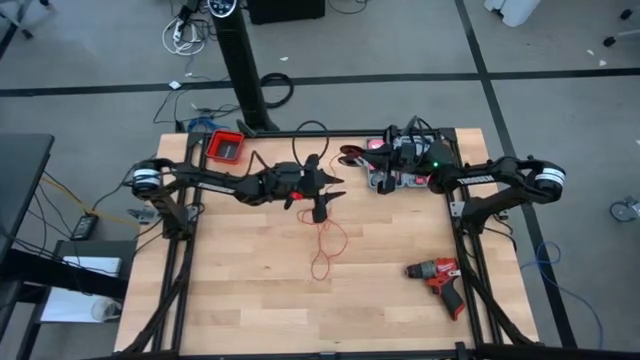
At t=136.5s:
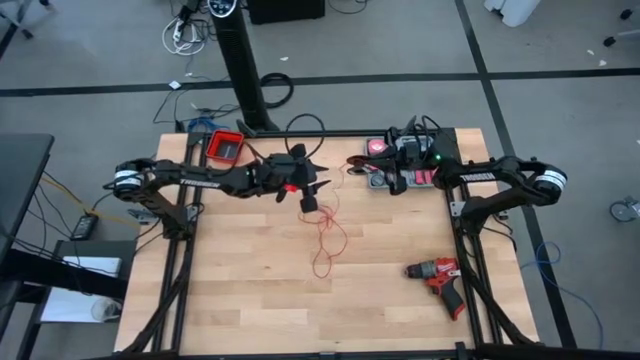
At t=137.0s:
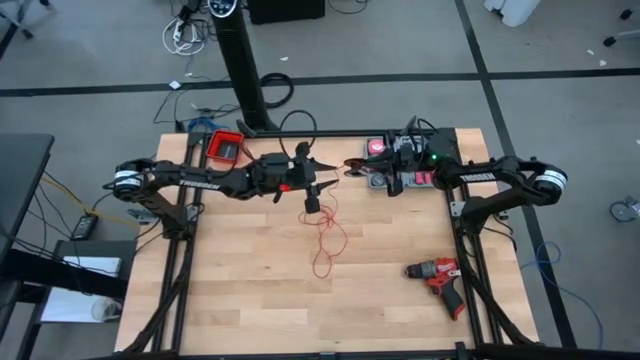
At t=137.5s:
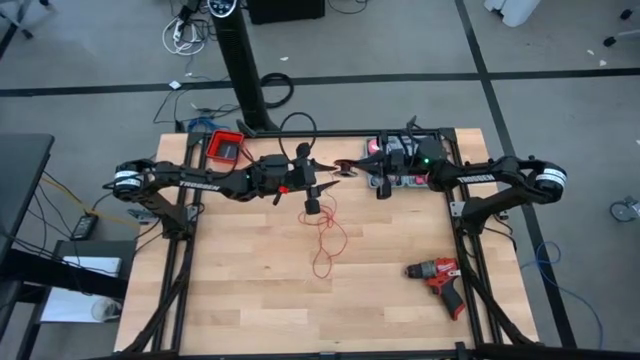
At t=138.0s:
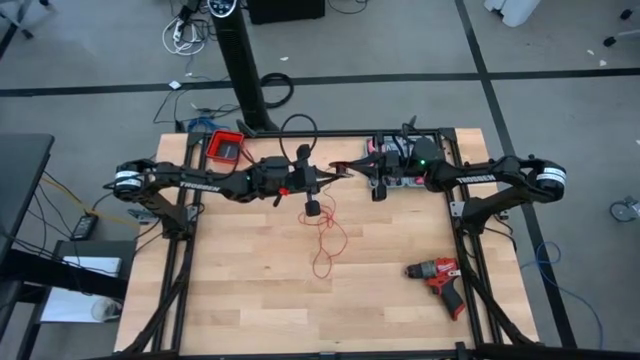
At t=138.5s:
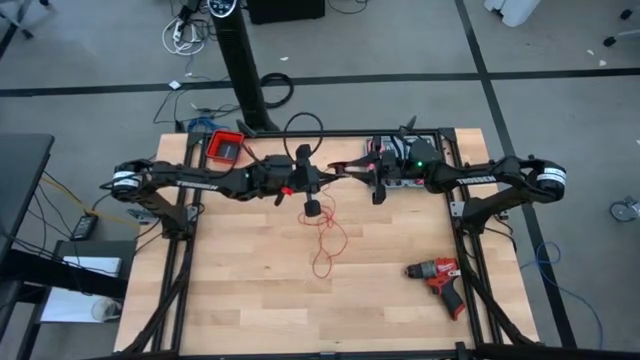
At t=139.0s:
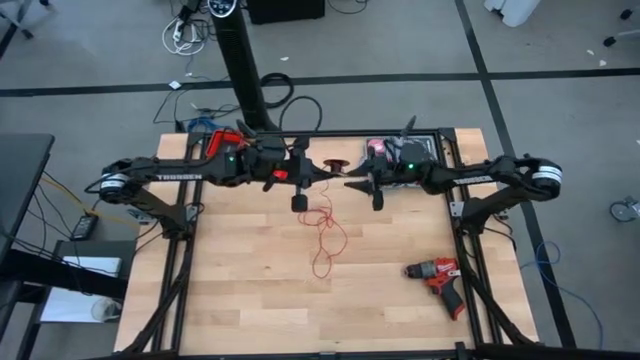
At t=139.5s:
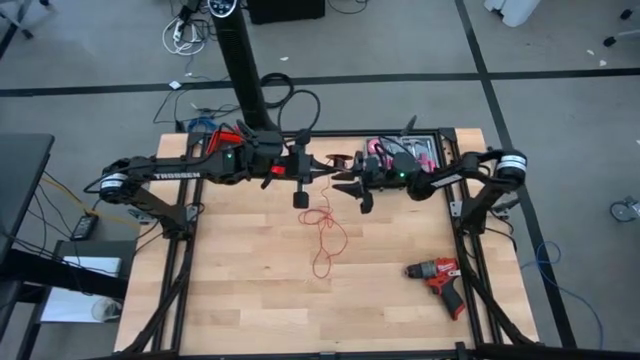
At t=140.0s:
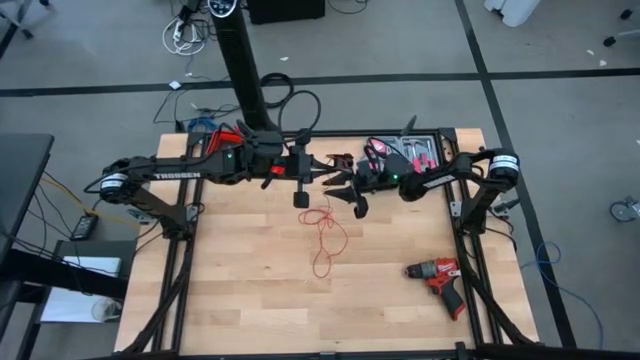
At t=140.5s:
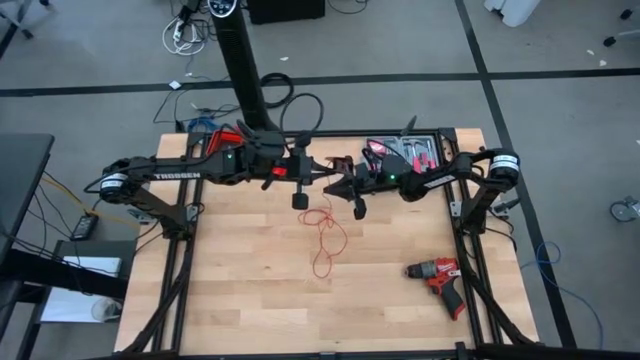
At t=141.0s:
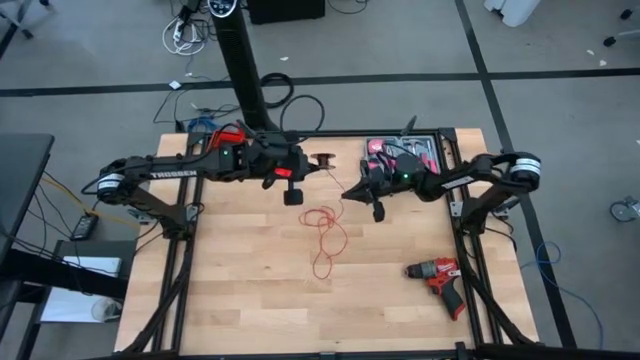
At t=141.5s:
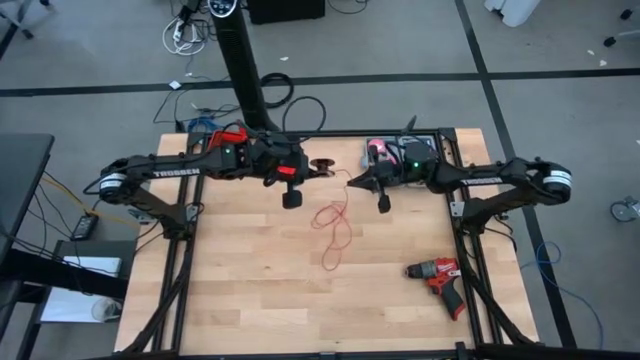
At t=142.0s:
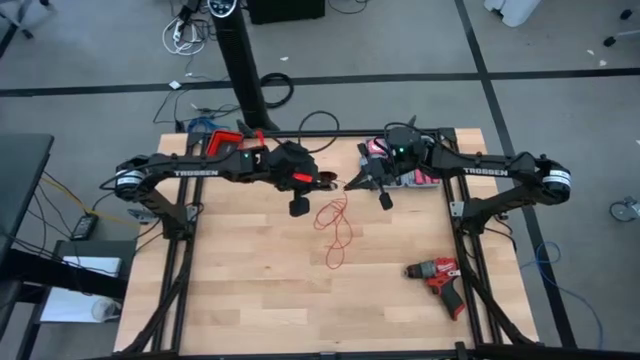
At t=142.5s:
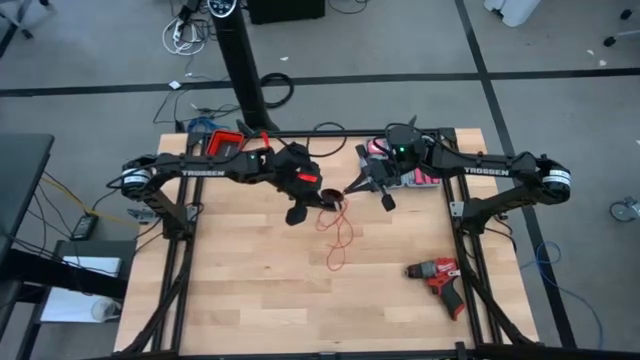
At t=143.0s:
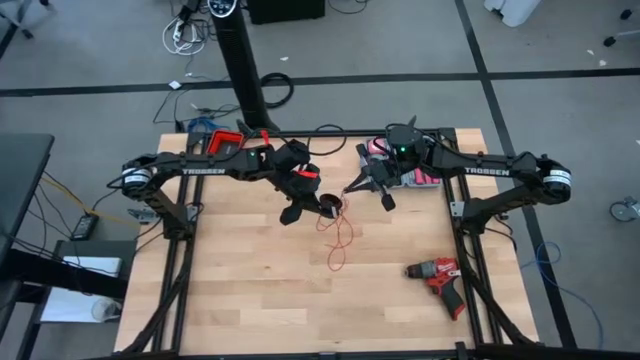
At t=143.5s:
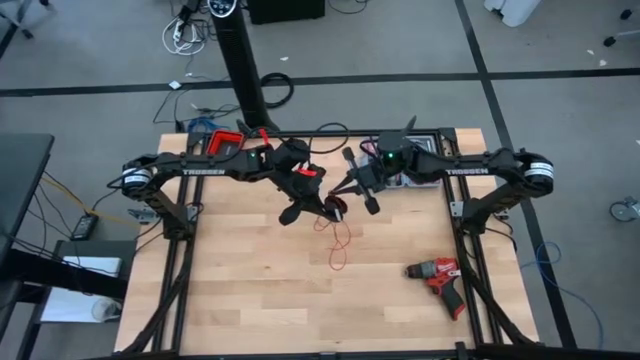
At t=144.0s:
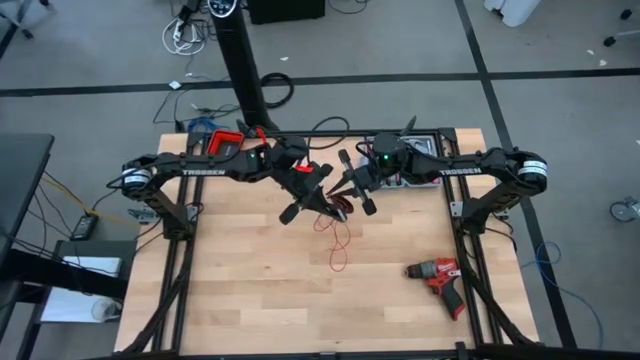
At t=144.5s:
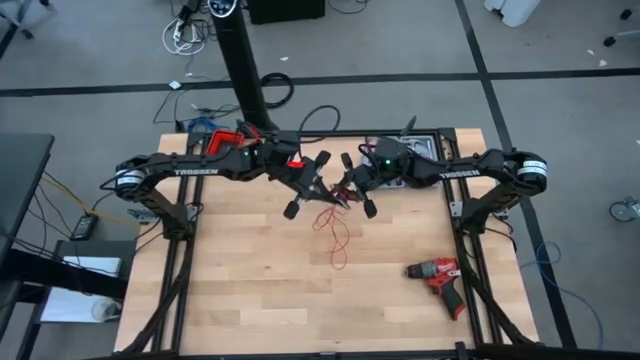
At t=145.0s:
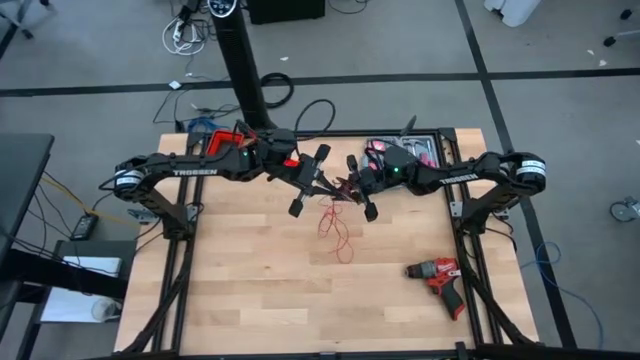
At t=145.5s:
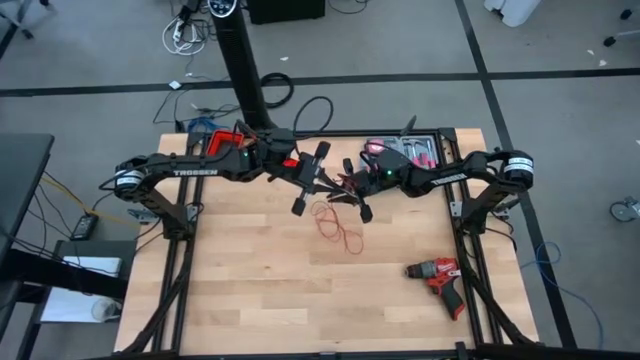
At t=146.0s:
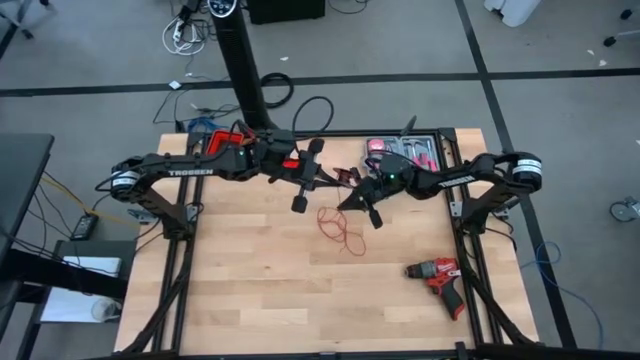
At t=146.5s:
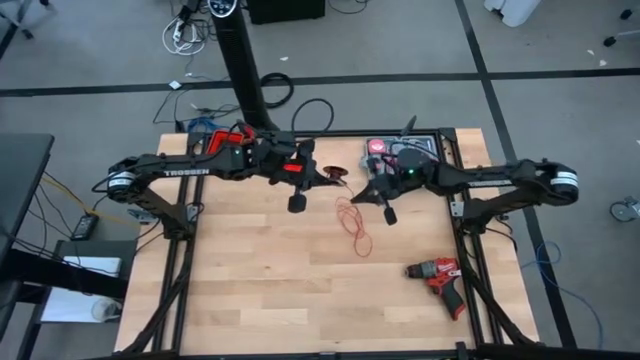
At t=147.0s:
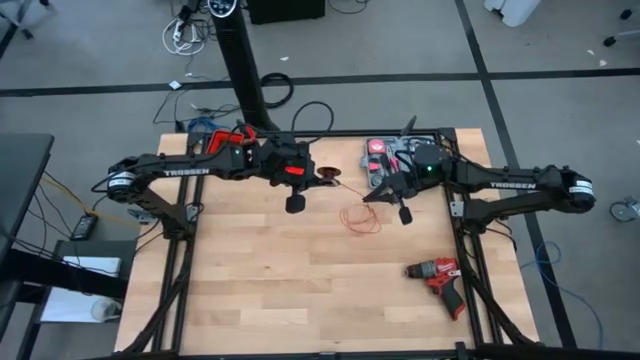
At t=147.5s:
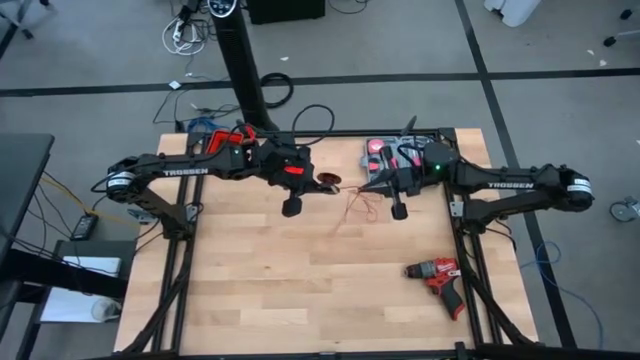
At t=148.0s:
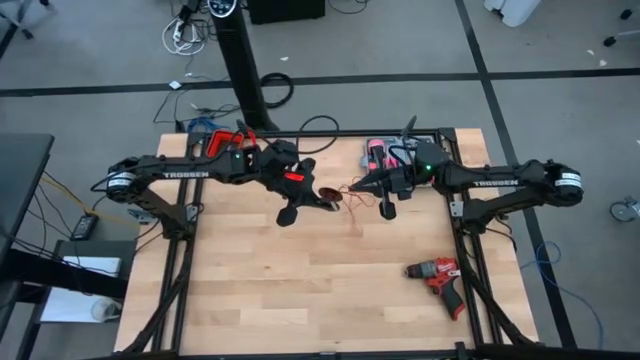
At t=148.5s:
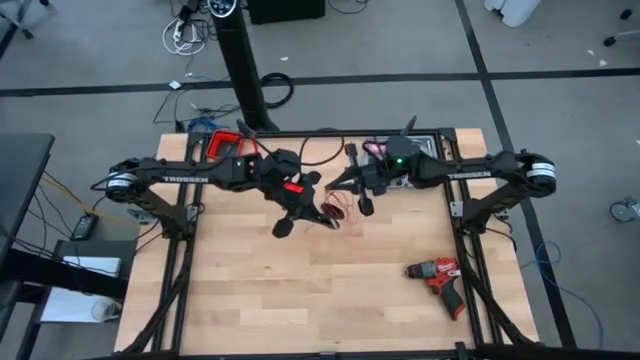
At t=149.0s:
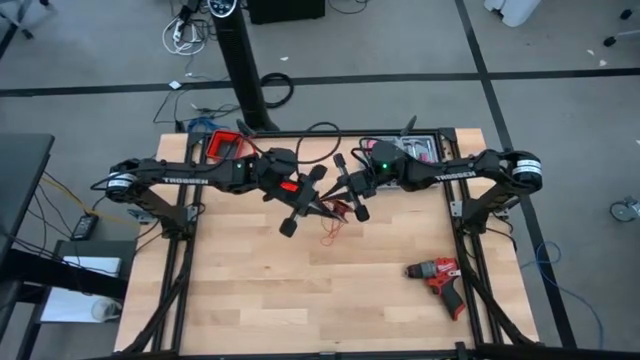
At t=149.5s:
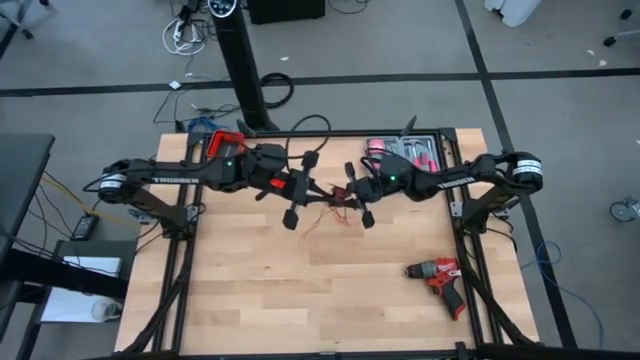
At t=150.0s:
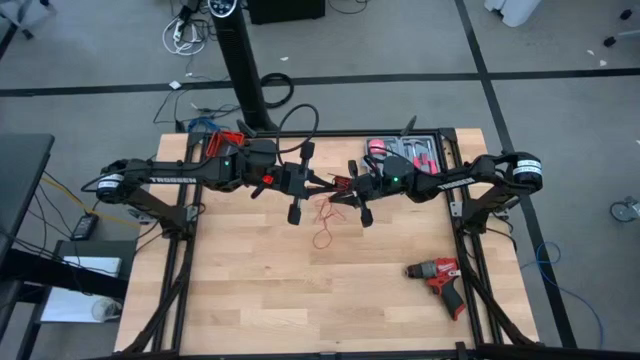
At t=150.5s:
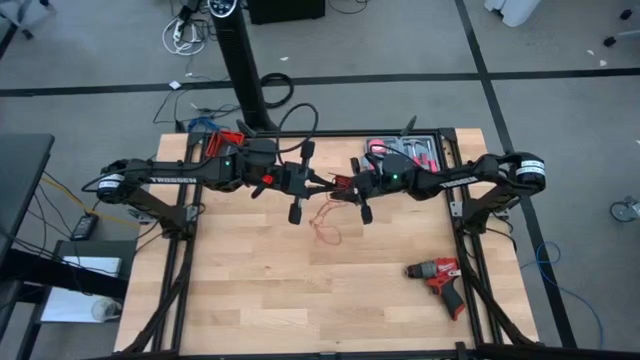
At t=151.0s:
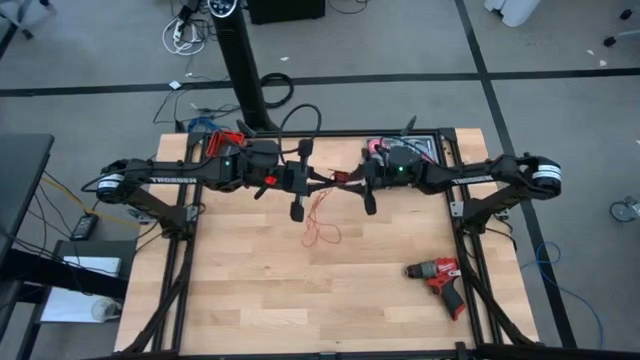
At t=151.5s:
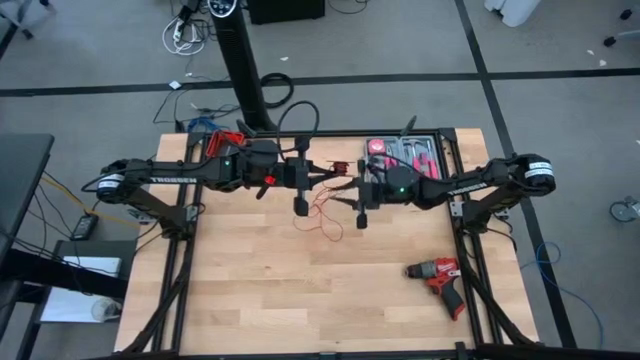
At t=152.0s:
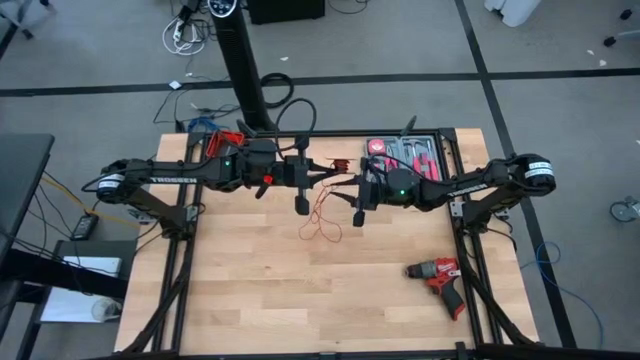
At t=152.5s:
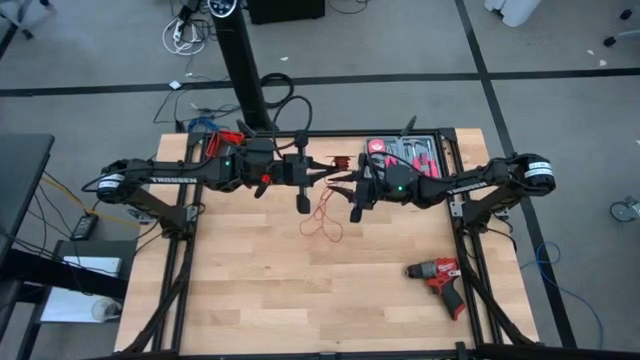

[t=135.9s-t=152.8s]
Task: Coil cords
Coil the red wire onto the black spool

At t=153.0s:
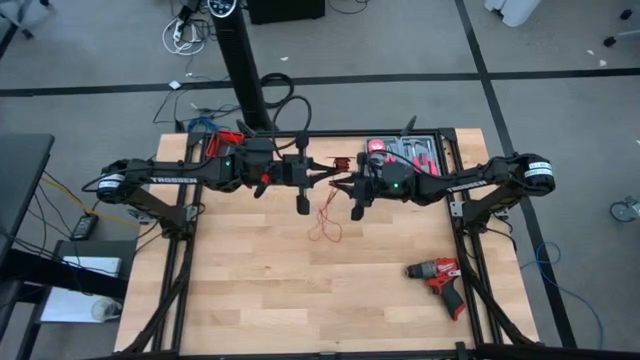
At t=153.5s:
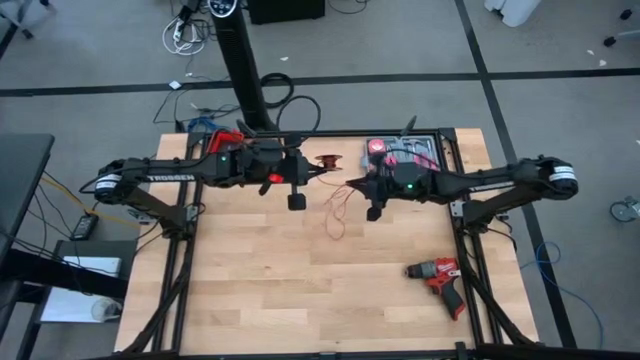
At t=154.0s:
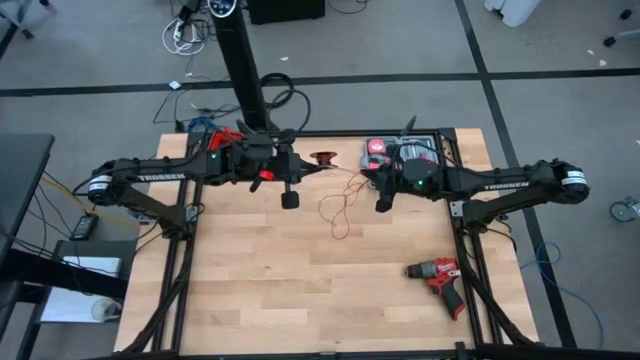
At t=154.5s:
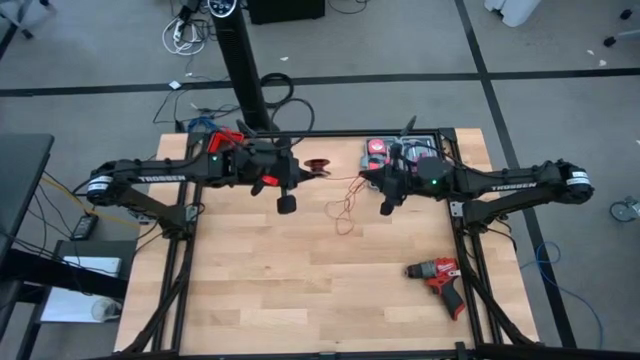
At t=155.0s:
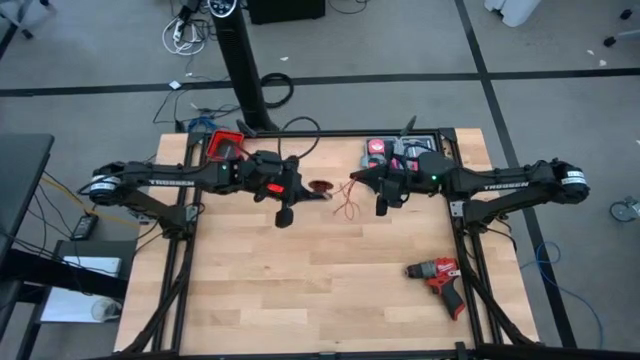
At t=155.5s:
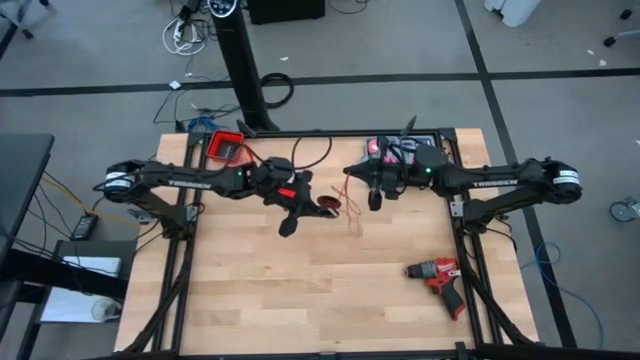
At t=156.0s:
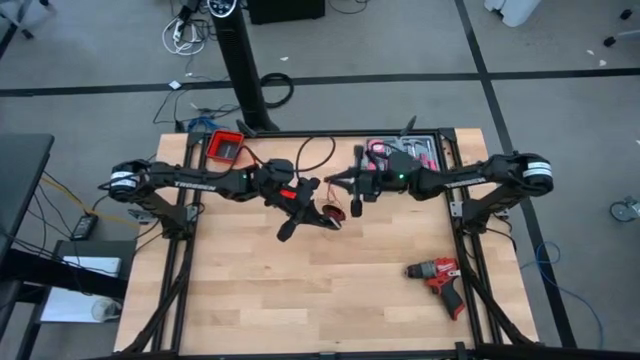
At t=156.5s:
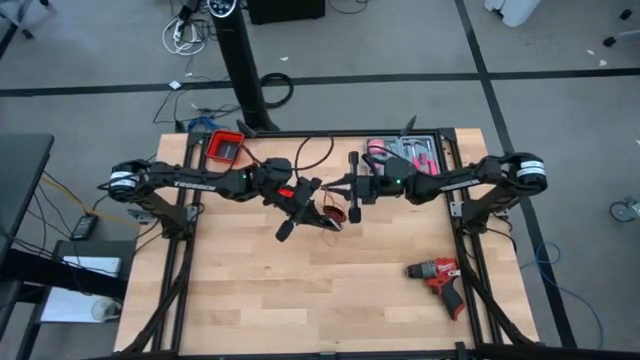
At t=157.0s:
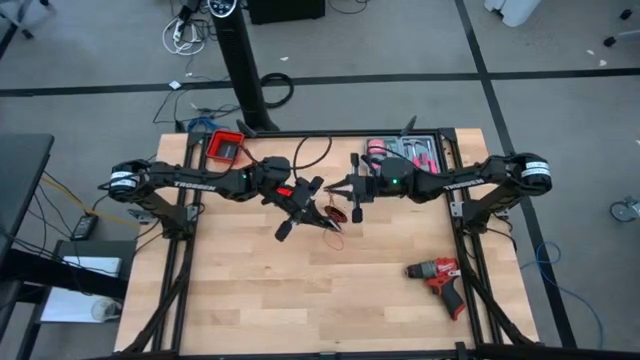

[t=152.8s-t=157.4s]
Coil the red wire onto the black spool
